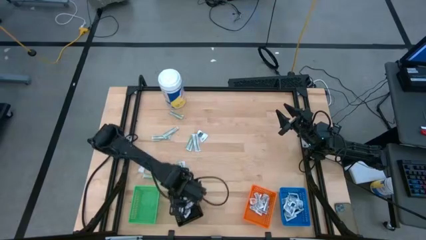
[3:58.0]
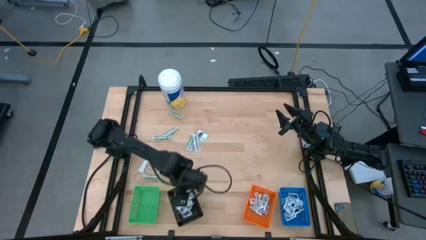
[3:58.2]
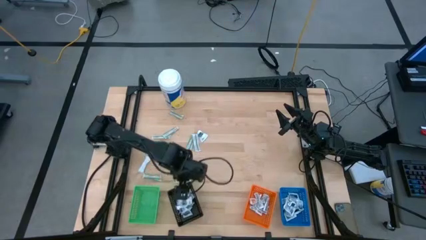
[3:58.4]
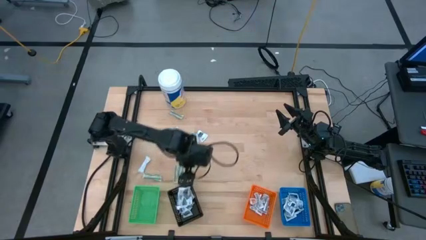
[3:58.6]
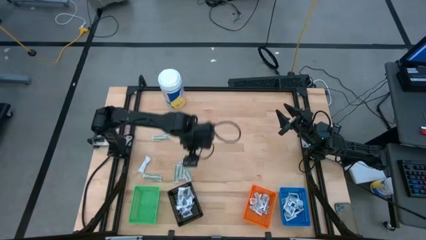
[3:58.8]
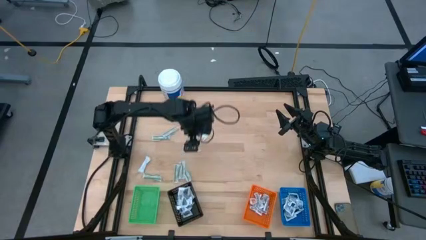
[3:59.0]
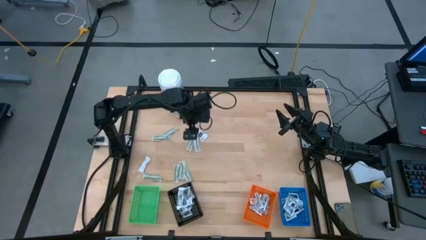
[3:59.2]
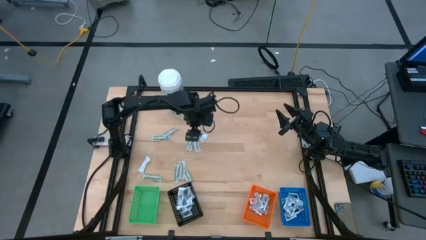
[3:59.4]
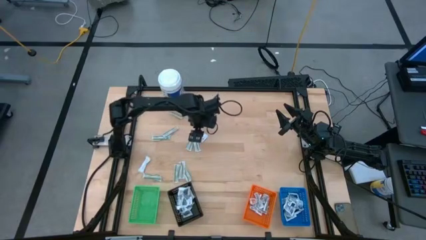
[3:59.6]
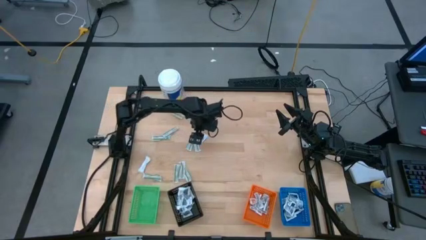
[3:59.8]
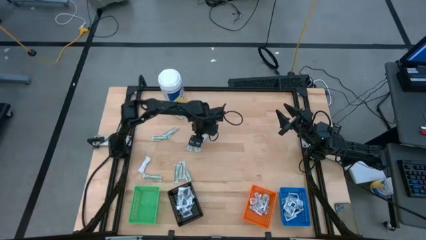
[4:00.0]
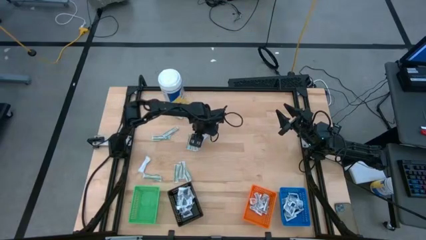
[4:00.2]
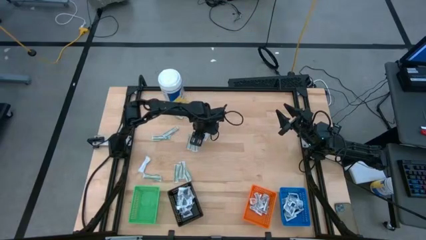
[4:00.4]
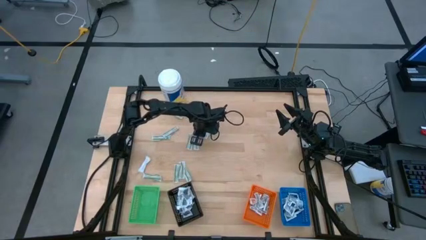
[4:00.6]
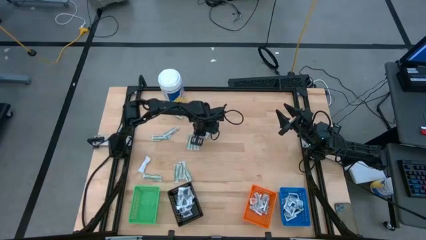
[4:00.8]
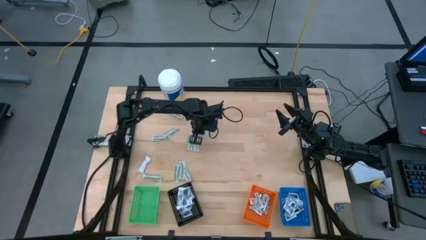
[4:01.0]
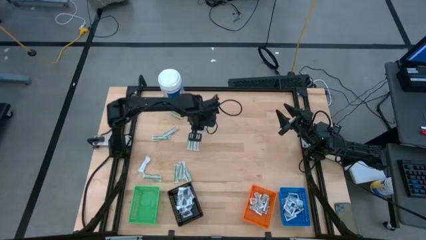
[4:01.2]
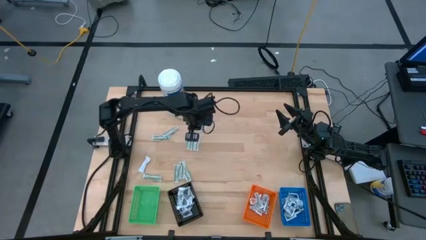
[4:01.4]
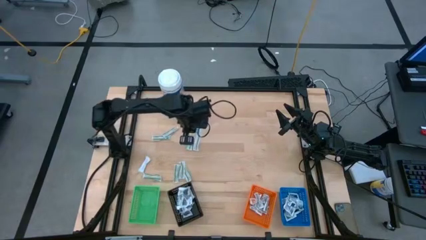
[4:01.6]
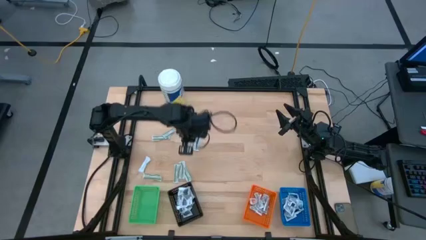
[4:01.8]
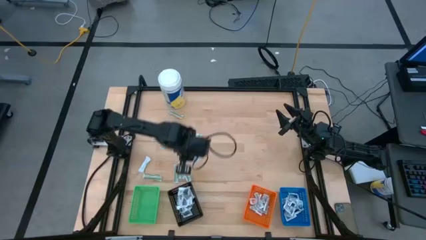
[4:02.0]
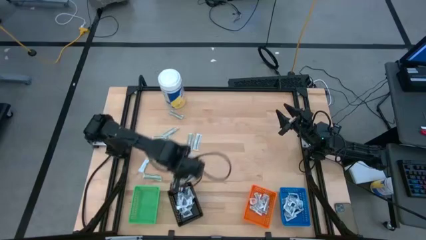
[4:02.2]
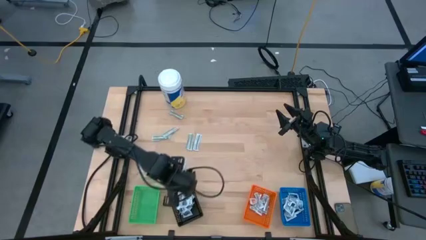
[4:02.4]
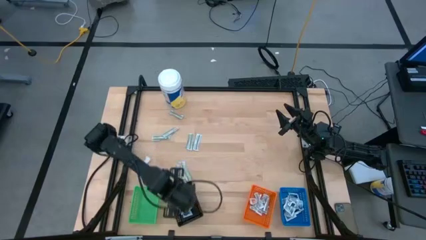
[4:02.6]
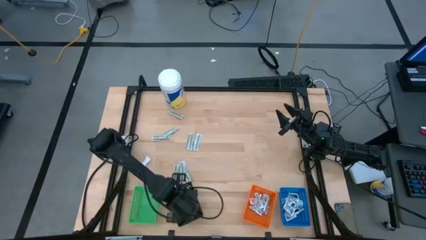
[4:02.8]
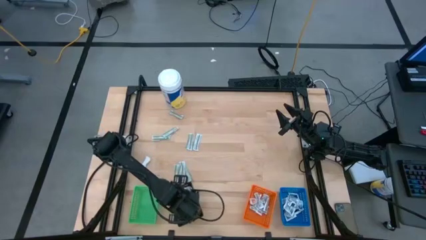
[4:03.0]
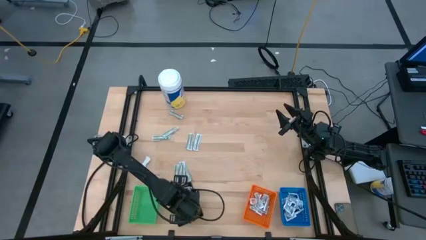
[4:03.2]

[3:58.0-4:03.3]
Task: Pick & Place First Aid Supplies
Put the towelette pack into the black bin

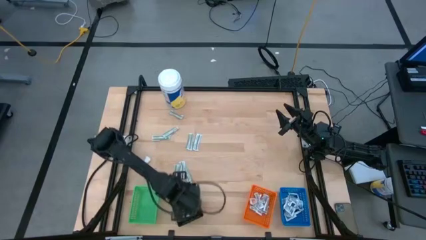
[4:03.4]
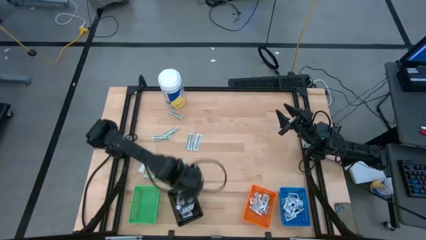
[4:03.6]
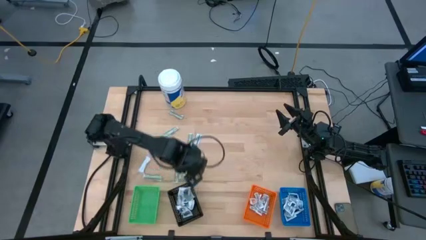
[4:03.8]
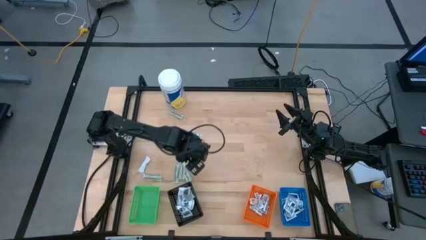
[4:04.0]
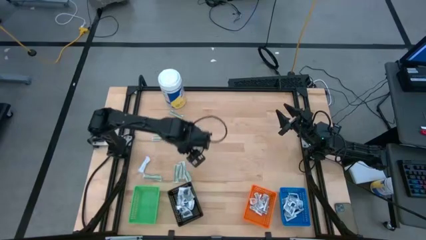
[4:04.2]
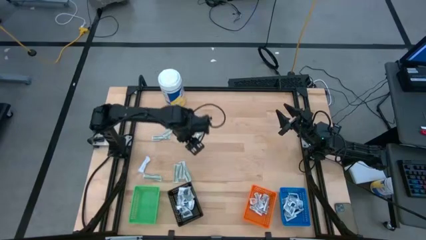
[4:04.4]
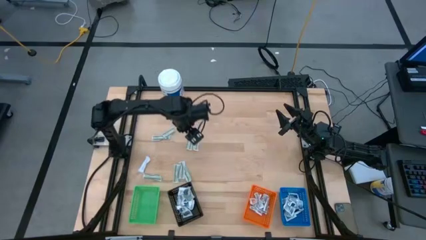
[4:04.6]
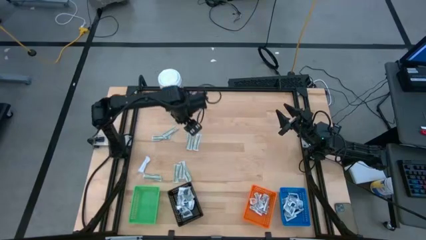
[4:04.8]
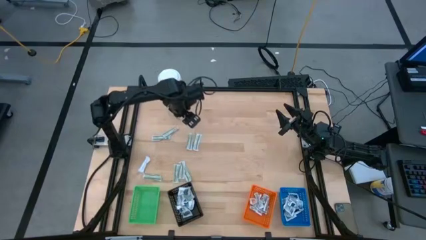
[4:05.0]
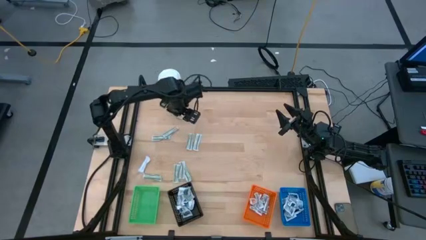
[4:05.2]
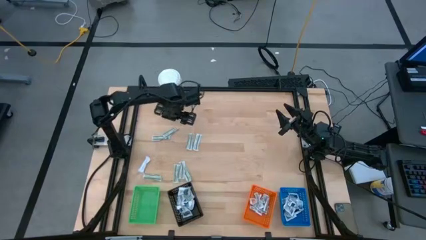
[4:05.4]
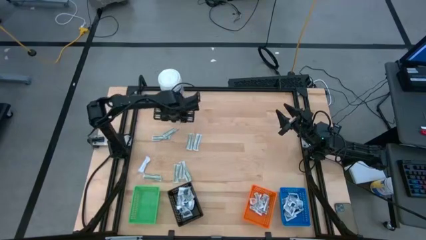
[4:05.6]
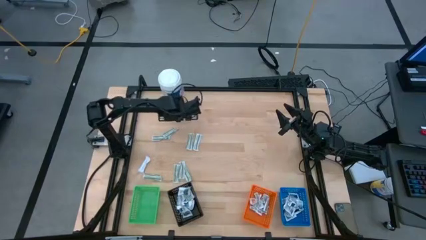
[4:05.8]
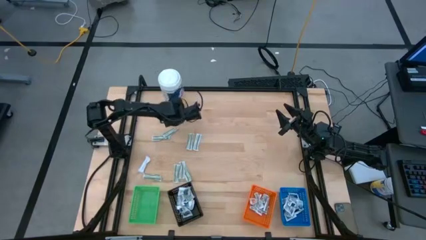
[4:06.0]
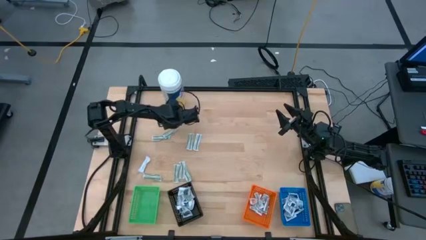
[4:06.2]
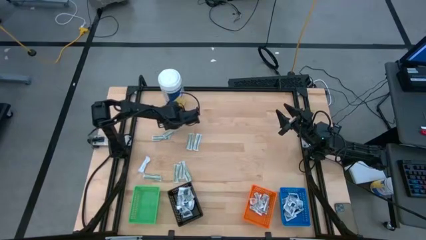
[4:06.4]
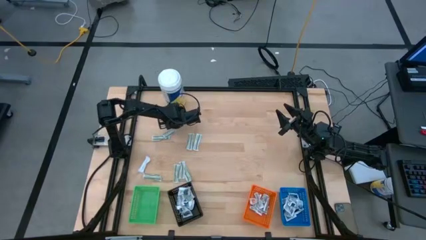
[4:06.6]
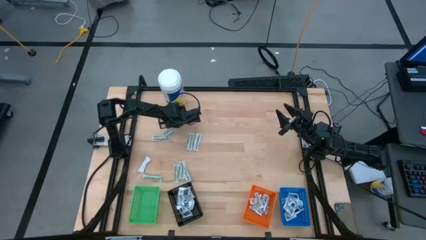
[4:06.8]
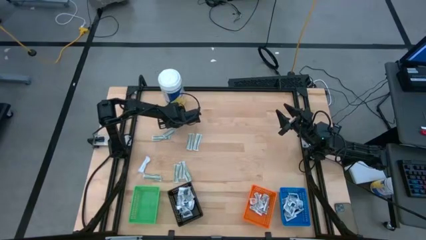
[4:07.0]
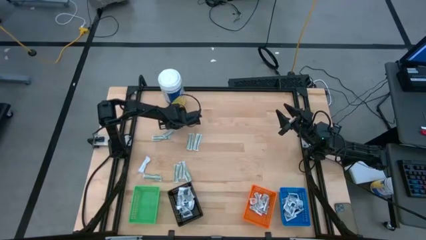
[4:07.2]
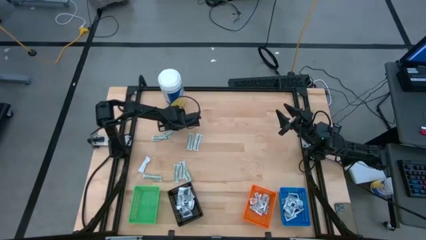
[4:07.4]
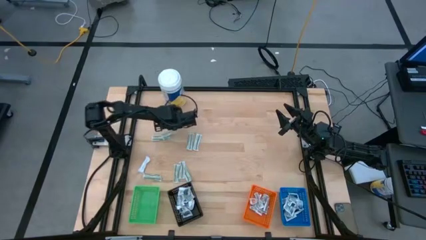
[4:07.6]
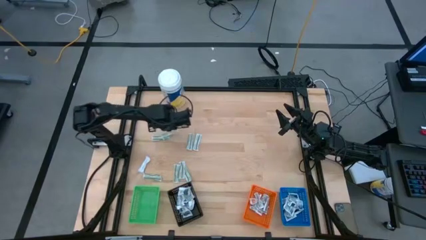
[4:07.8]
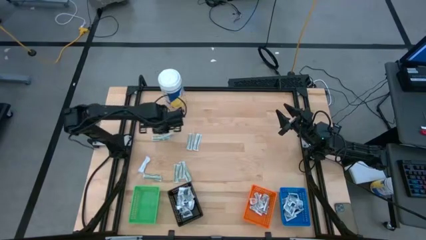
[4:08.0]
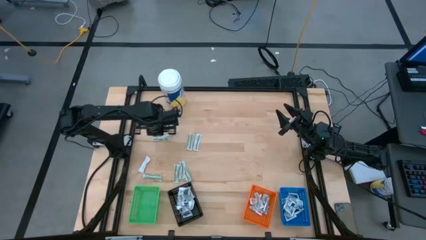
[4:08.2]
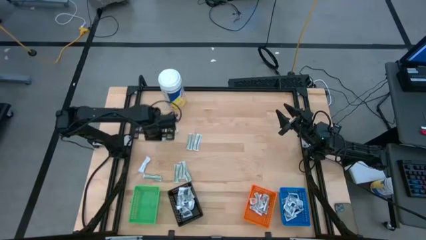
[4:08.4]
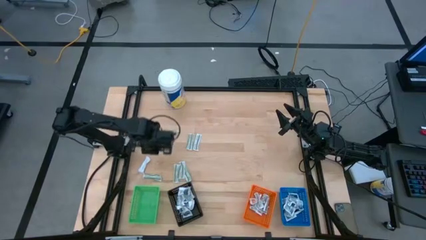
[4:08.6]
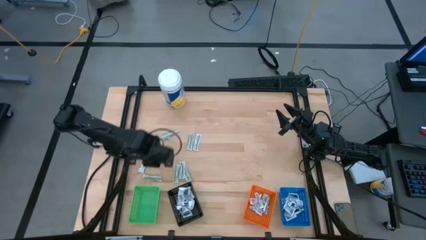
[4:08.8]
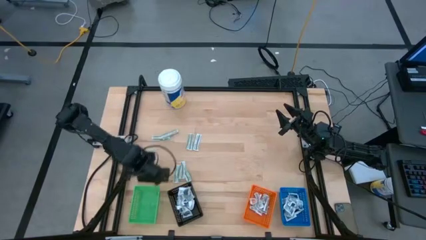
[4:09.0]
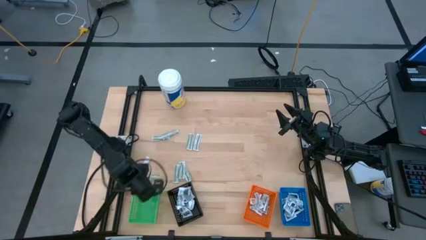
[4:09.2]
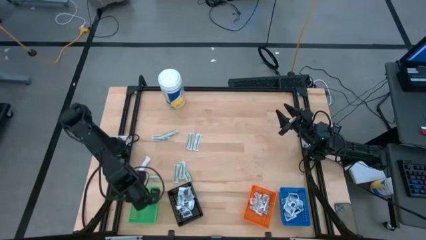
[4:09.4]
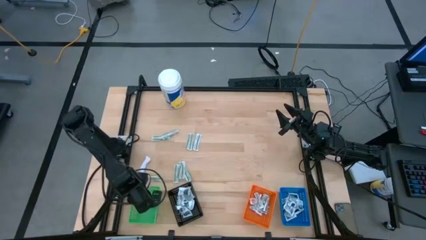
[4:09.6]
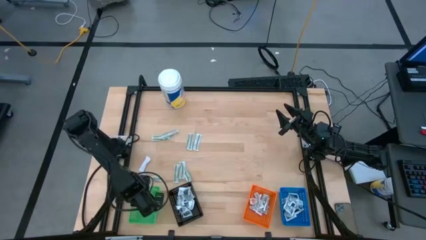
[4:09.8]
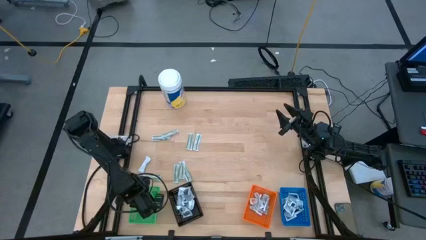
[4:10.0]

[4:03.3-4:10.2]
Put the bandage into the green bin

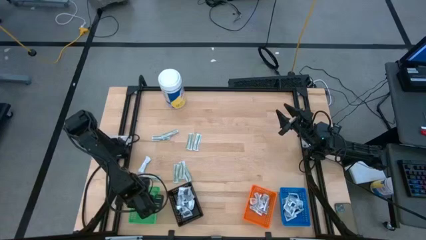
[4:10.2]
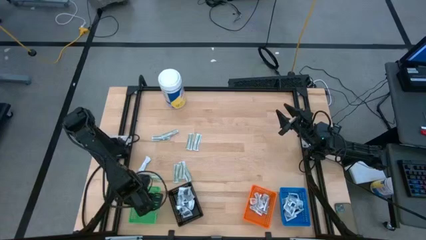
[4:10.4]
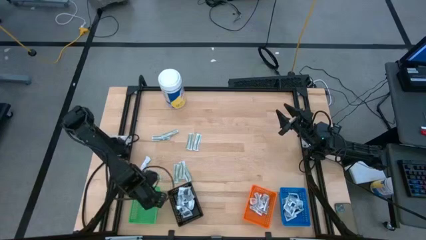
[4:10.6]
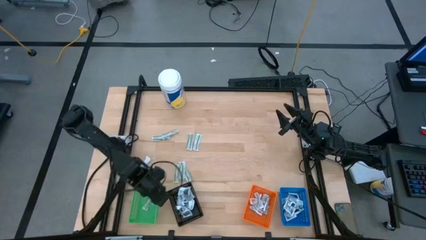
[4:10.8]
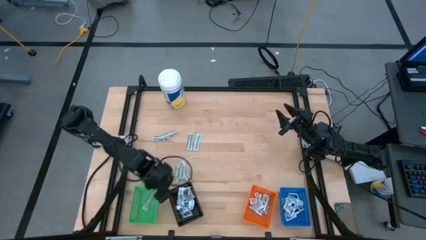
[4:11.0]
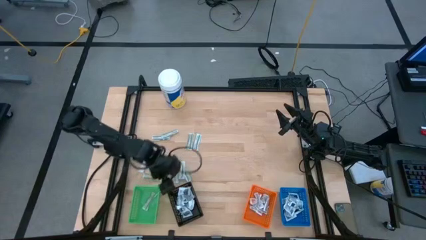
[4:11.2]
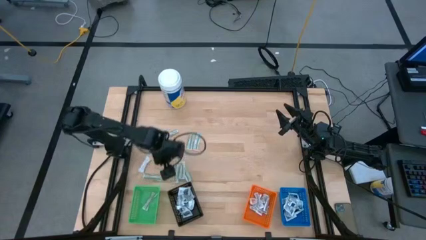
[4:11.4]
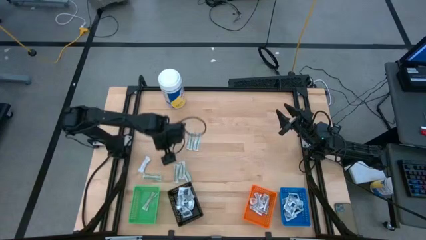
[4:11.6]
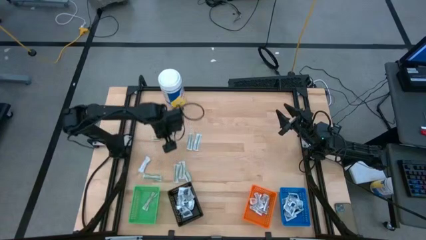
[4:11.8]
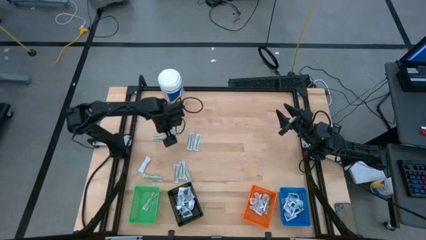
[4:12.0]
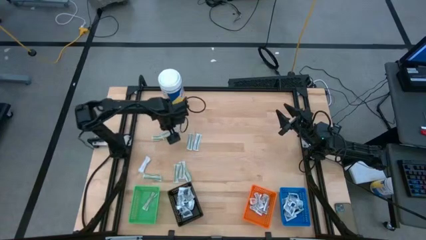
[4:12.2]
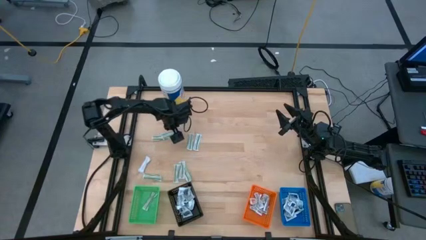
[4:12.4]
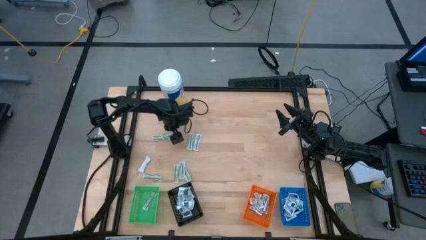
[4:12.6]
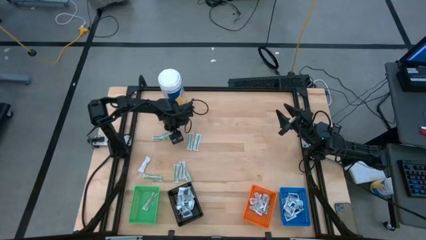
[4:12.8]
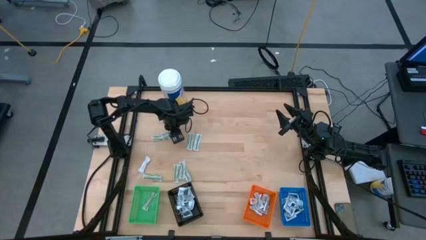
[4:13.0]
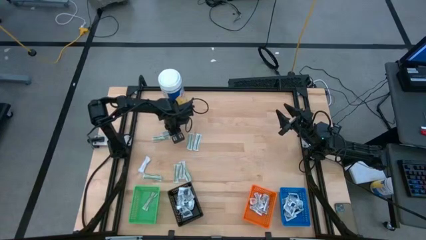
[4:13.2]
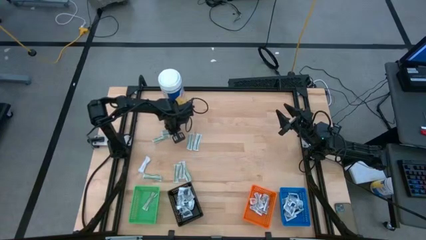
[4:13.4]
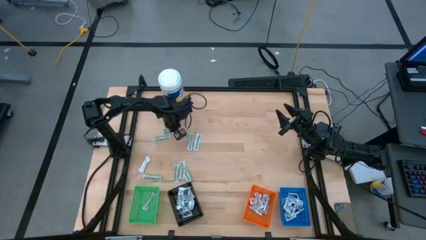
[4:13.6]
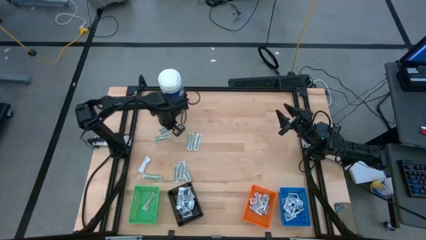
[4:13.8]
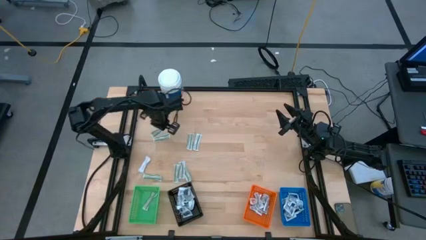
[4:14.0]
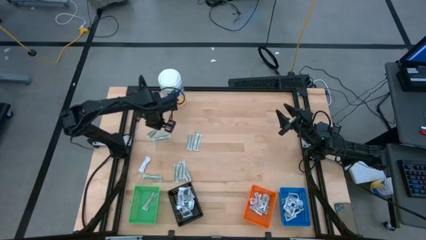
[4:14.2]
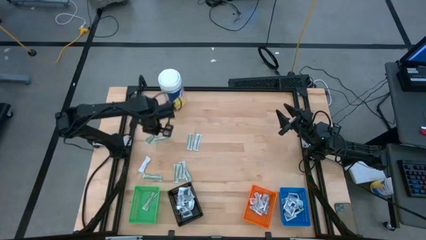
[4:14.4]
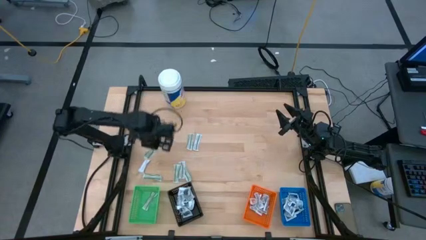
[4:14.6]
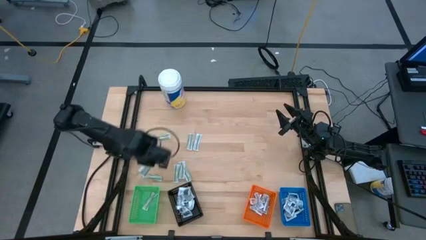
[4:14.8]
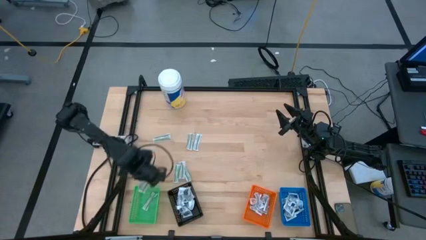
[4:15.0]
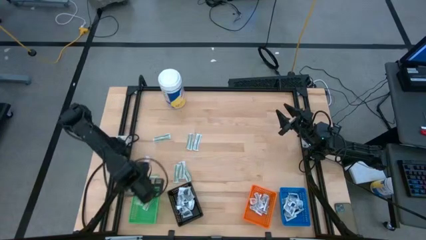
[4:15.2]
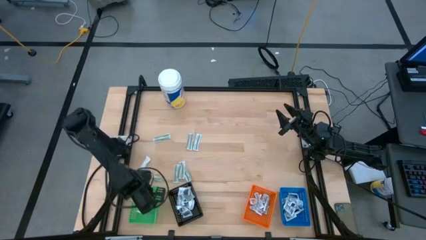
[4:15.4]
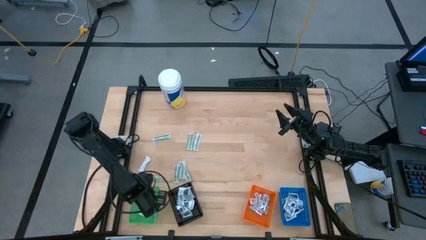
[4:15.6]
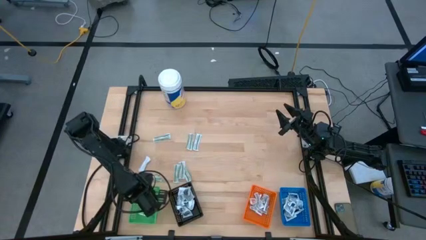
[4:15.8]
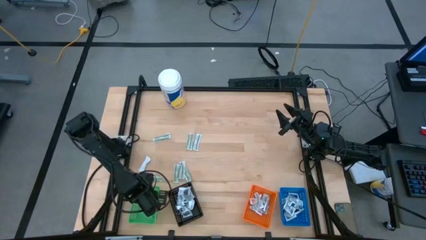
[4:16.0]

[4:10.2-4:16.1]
Put the bandage into the green bin
